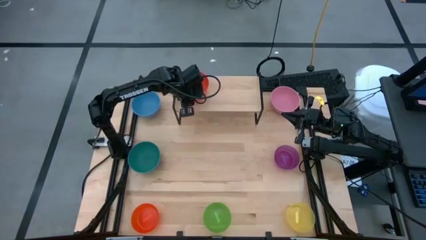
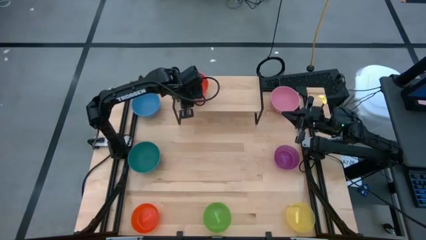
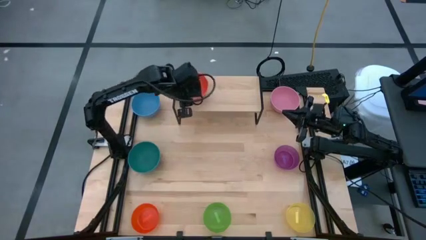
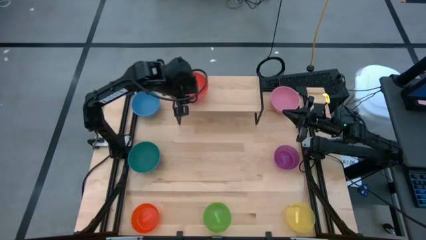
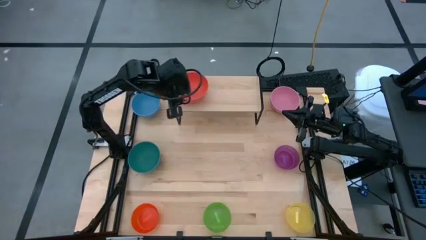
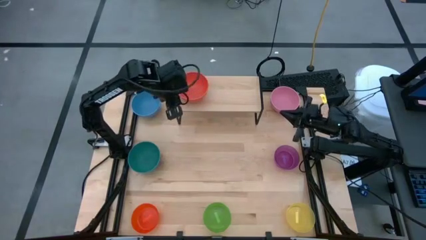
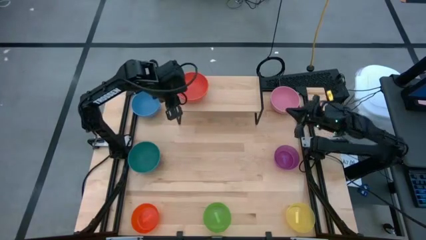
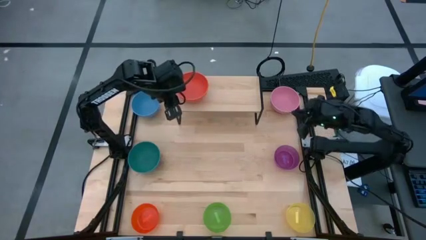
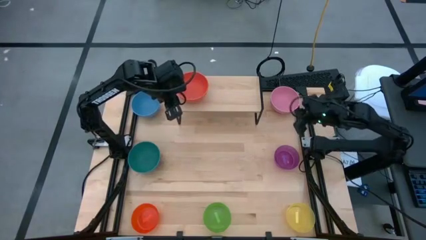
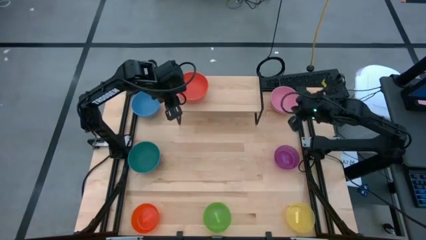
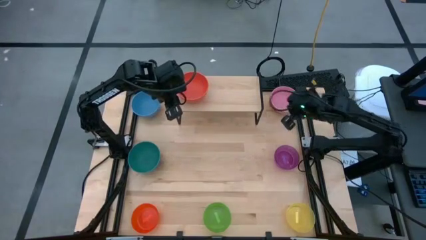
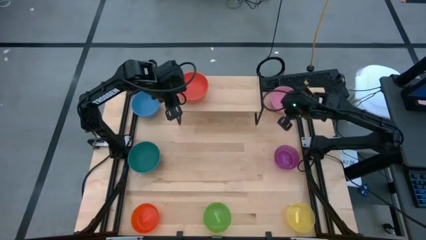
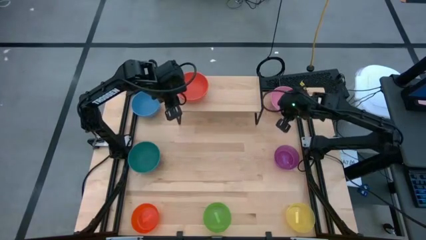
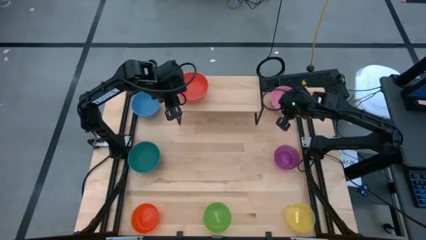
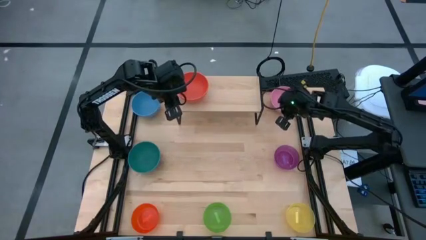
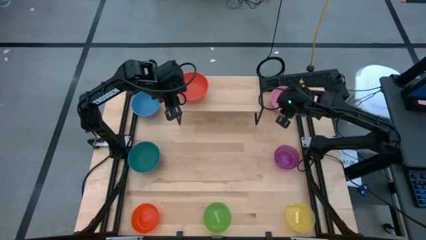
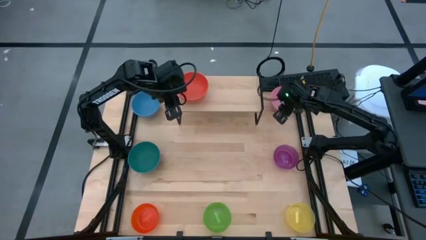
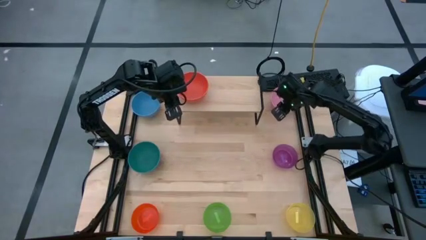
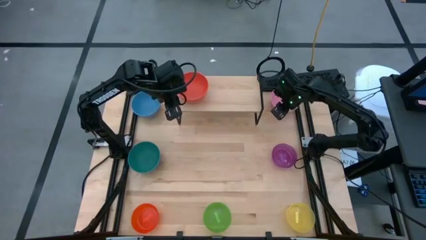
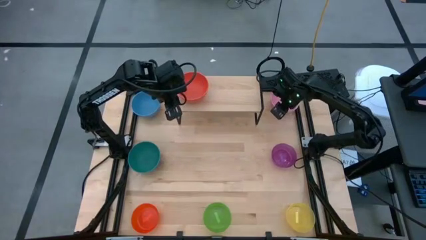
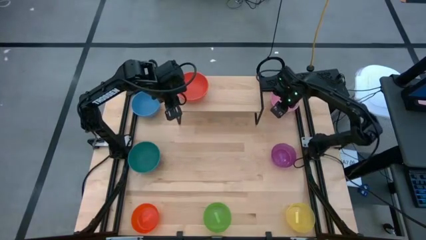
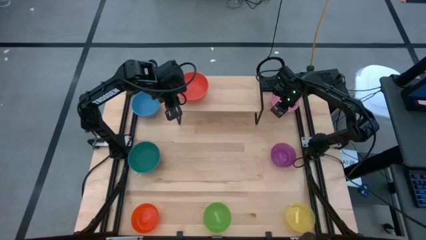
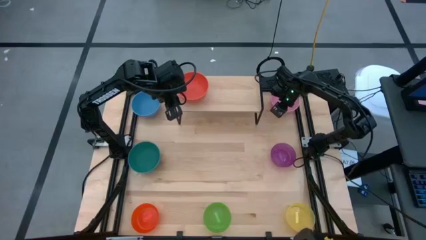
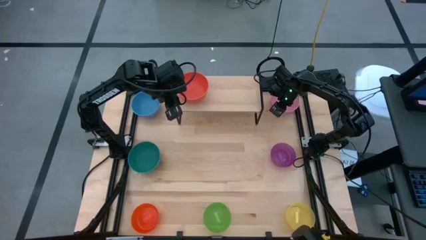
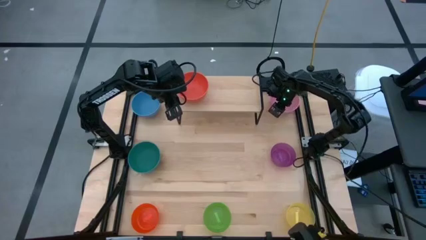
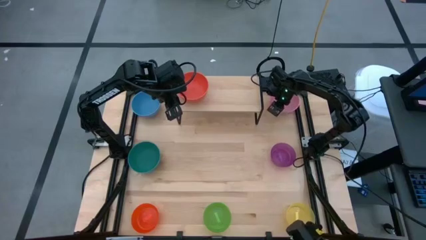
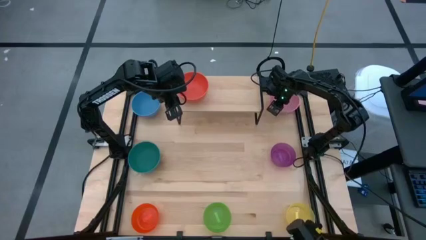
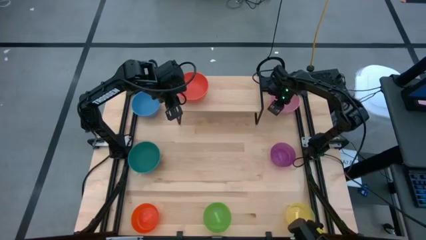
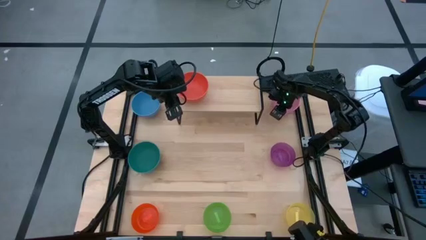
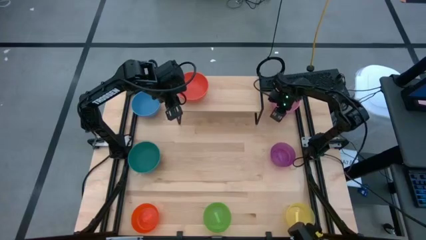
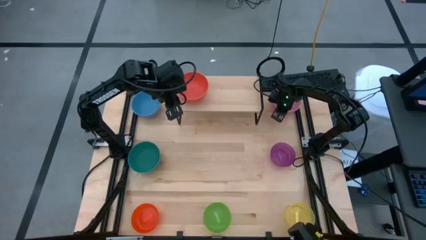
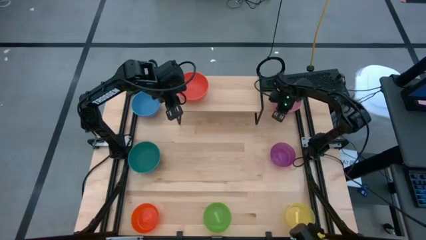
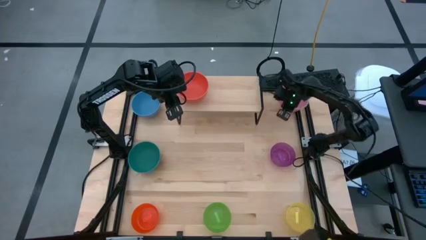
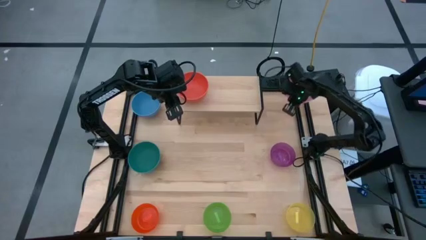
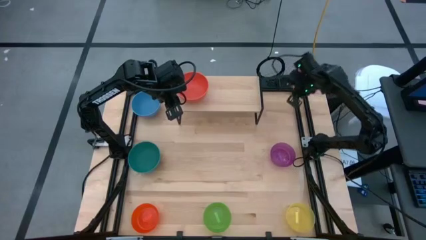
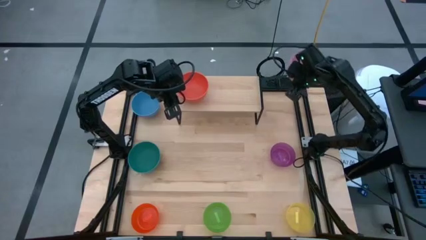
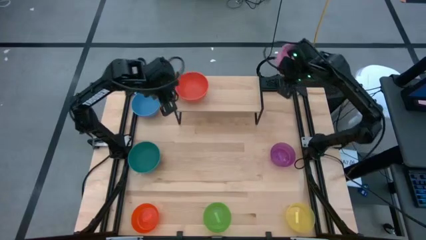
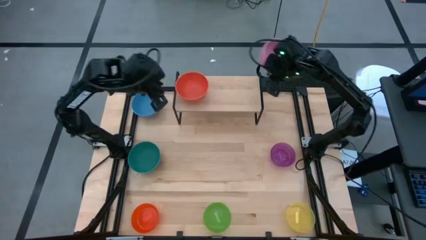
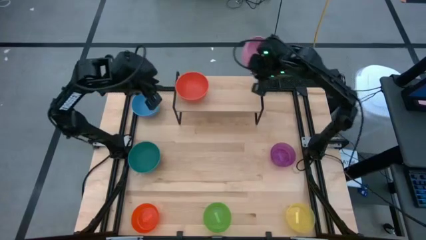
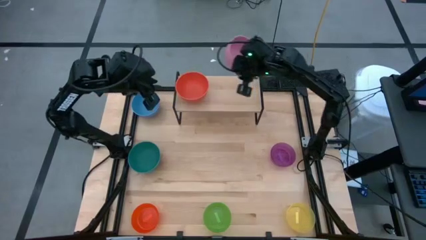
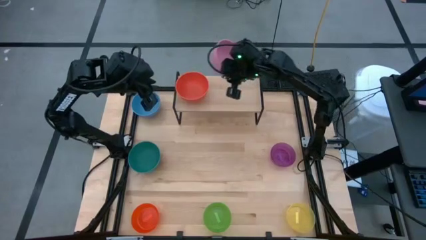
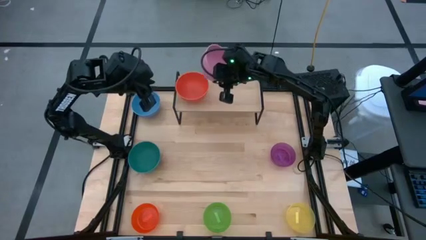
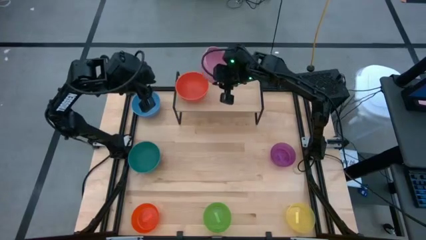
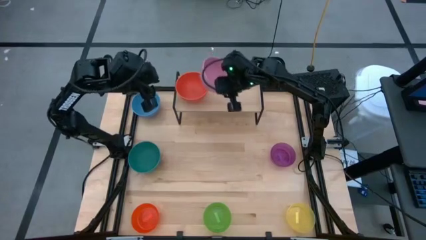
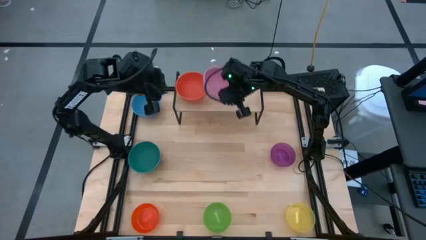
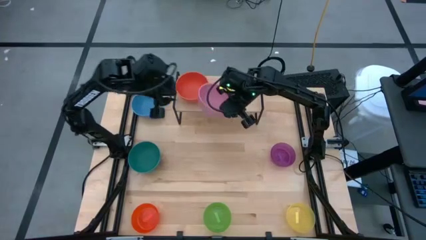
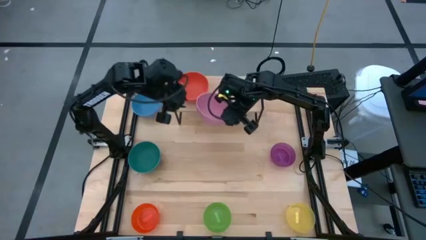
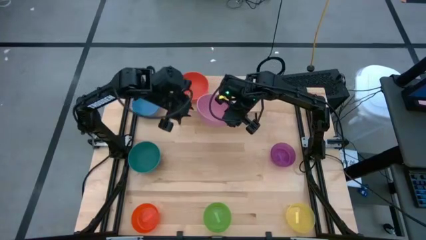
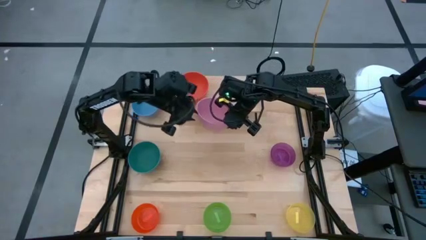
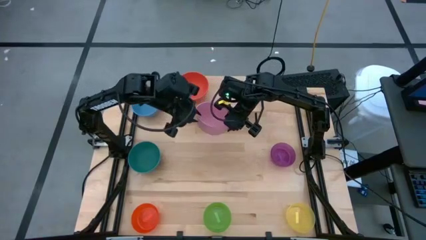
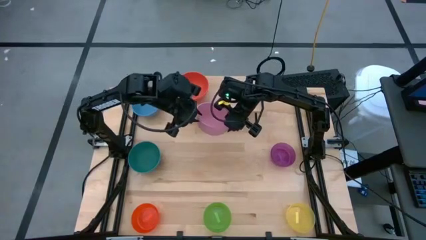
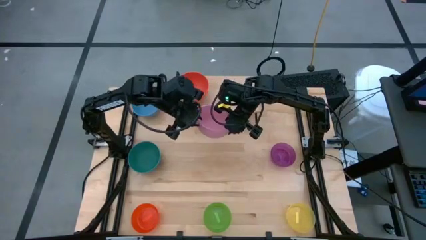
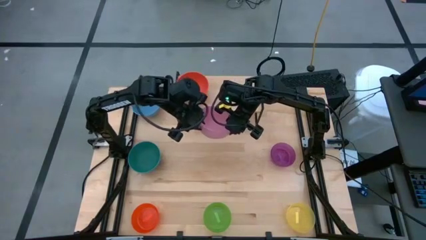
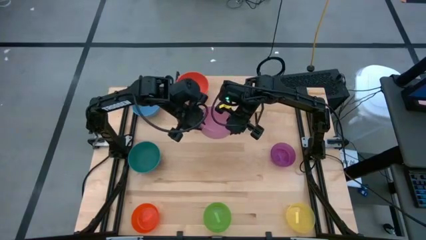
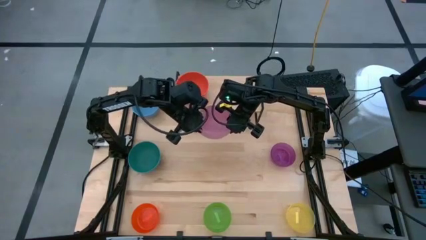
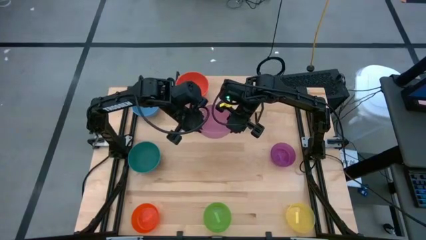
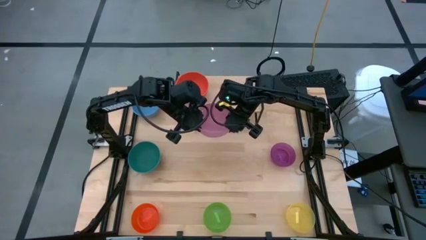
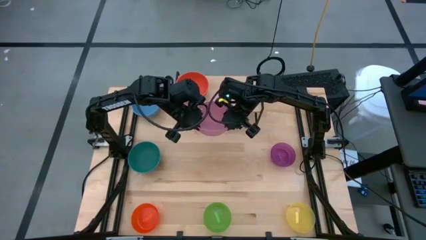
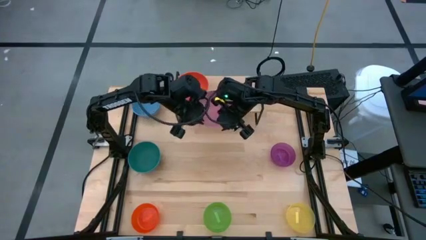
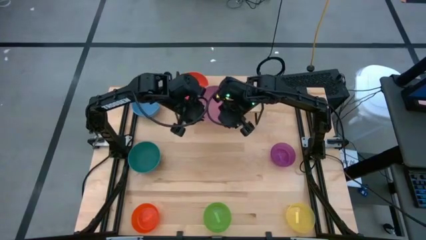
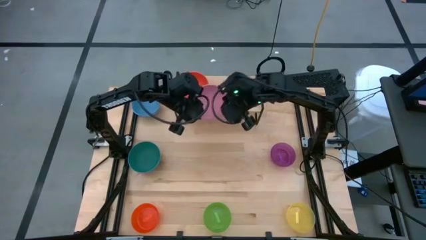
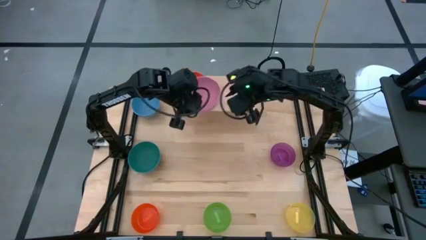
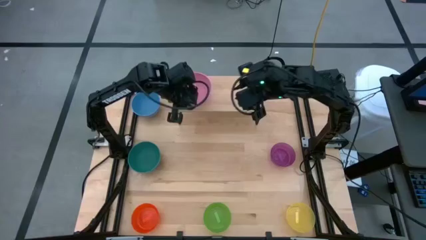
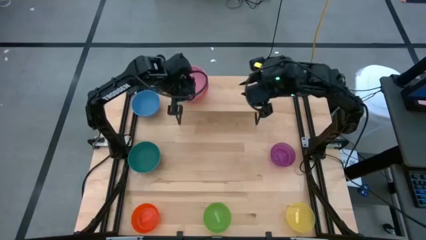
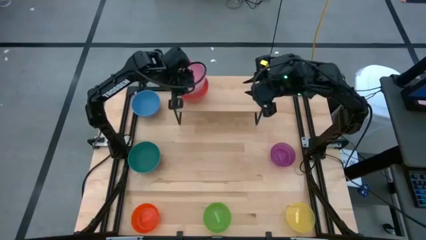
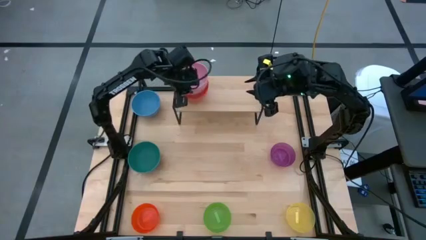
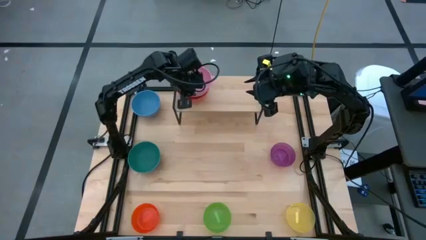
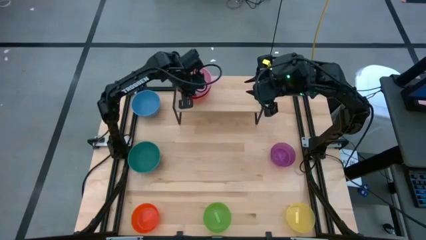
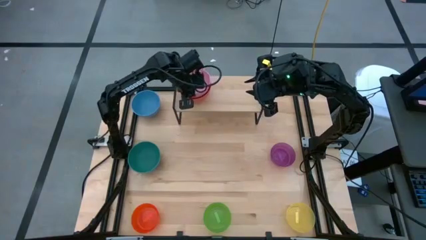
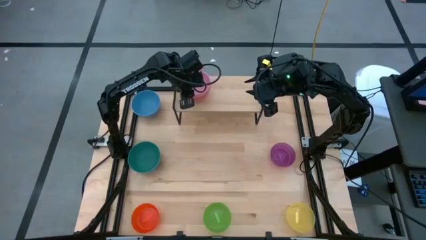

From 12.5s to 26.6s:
Task: Place and stack bowls onto a shelf
Stack the pink bowl on top of the orange bowl on the shelf
